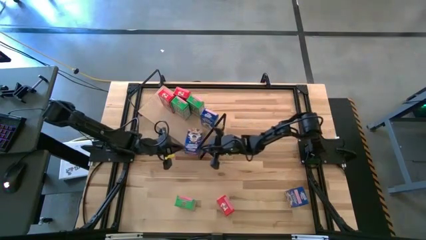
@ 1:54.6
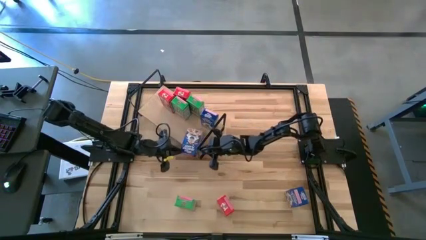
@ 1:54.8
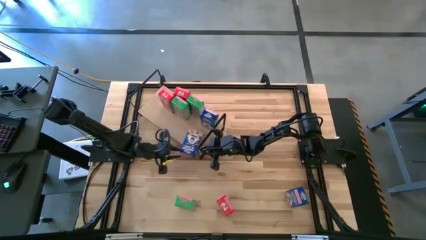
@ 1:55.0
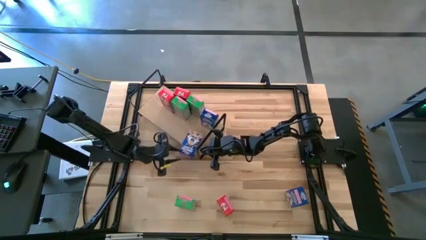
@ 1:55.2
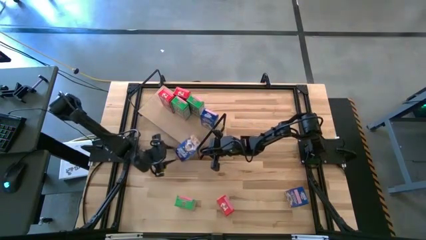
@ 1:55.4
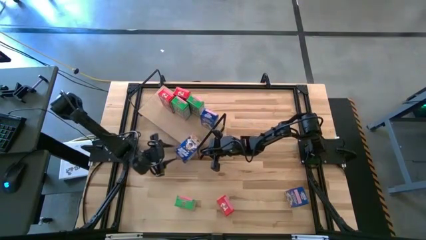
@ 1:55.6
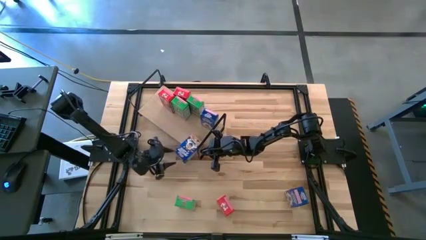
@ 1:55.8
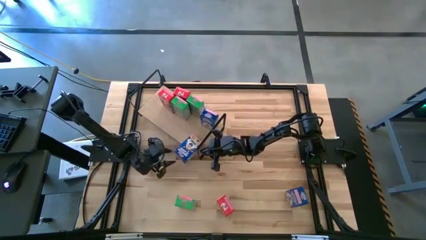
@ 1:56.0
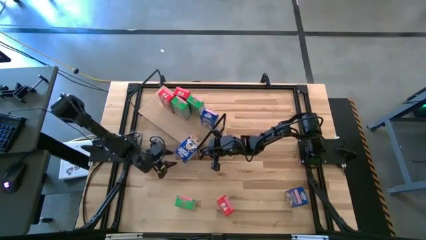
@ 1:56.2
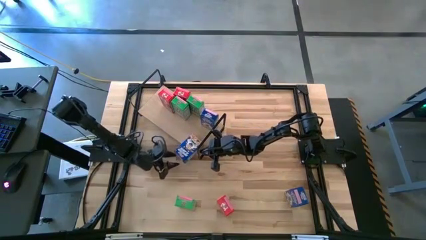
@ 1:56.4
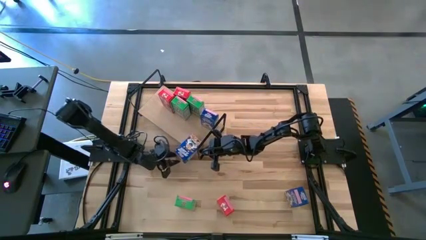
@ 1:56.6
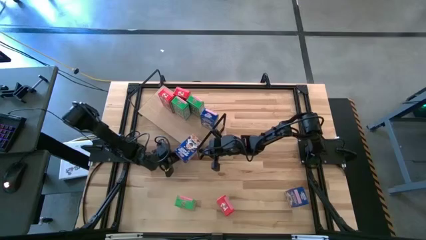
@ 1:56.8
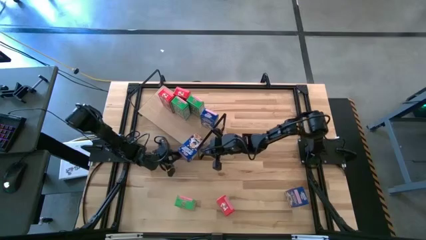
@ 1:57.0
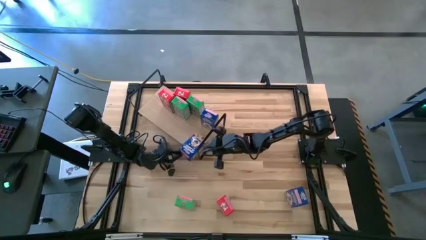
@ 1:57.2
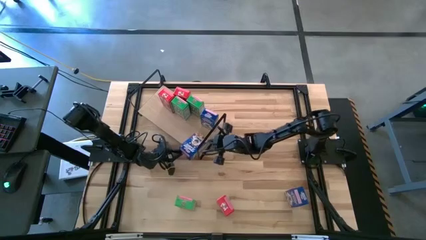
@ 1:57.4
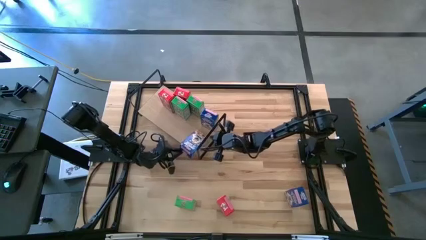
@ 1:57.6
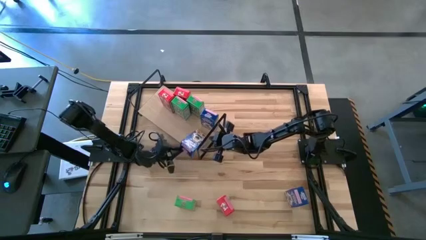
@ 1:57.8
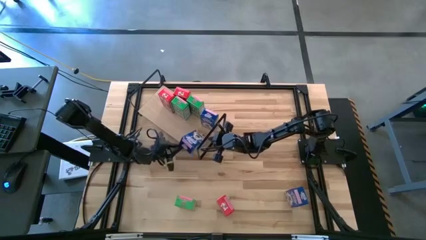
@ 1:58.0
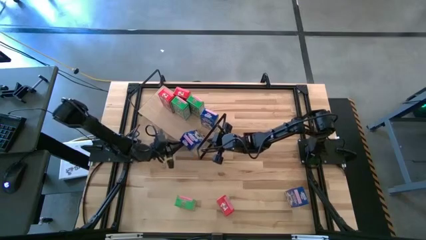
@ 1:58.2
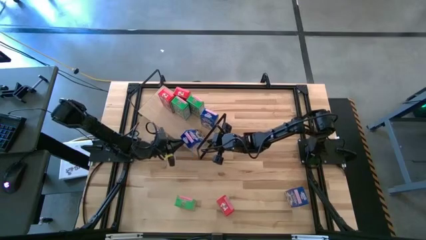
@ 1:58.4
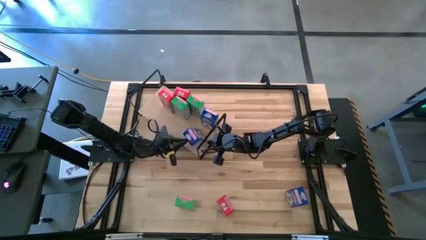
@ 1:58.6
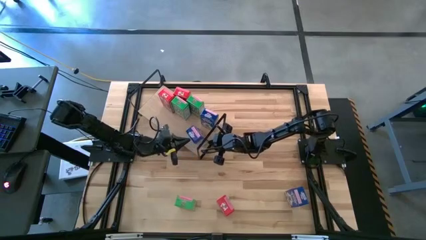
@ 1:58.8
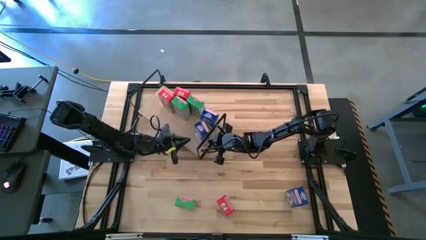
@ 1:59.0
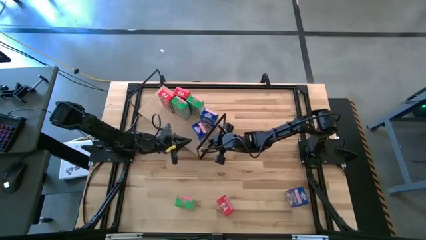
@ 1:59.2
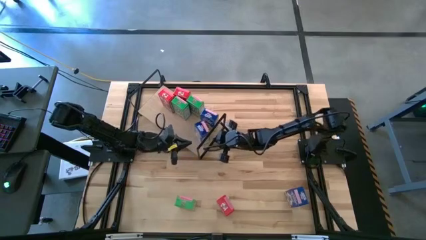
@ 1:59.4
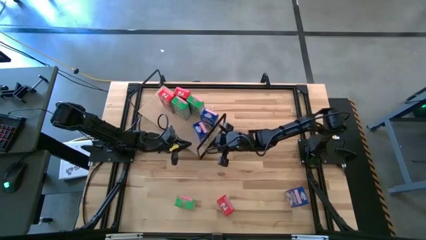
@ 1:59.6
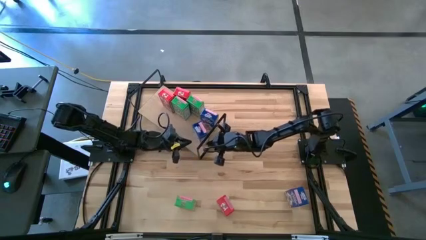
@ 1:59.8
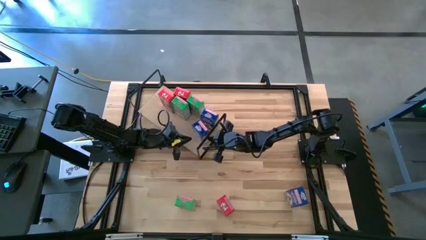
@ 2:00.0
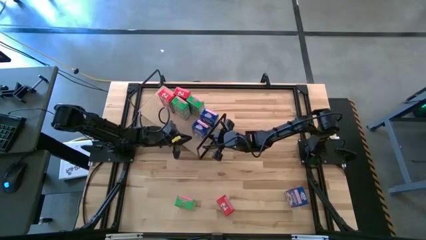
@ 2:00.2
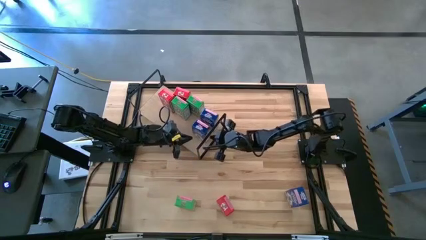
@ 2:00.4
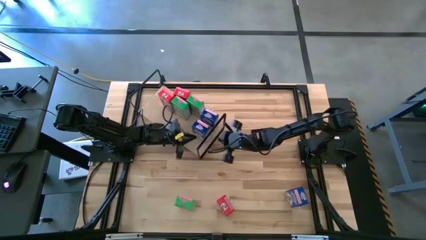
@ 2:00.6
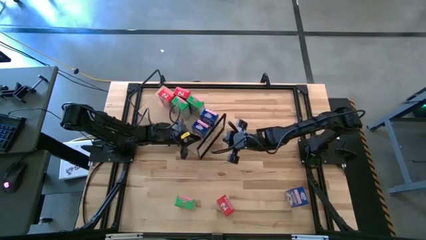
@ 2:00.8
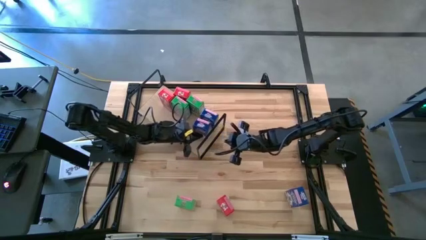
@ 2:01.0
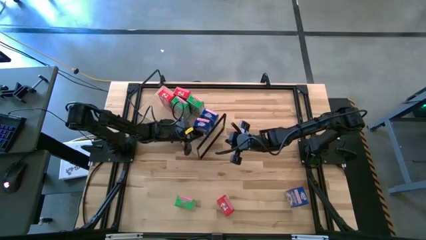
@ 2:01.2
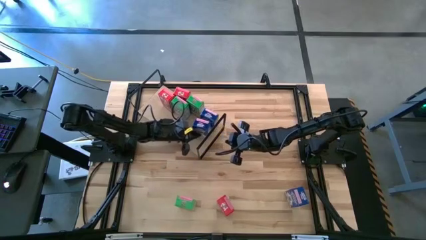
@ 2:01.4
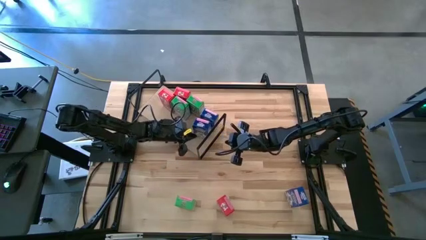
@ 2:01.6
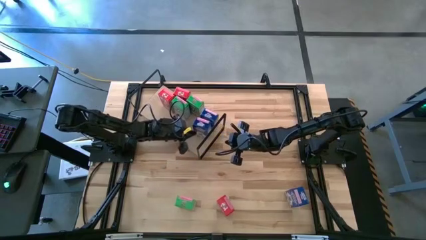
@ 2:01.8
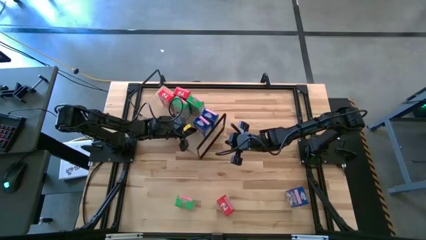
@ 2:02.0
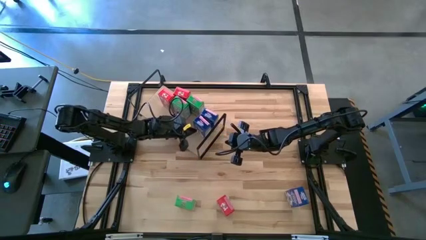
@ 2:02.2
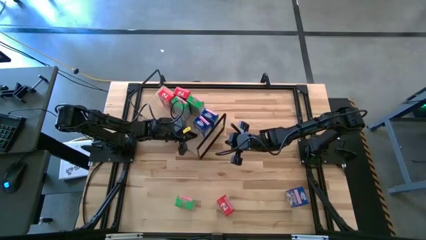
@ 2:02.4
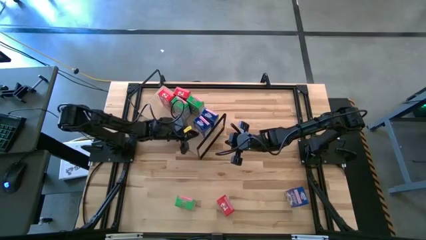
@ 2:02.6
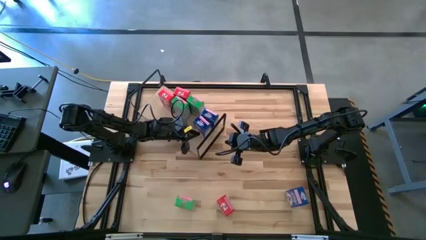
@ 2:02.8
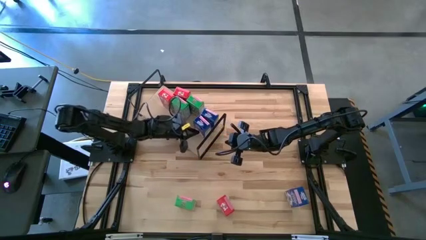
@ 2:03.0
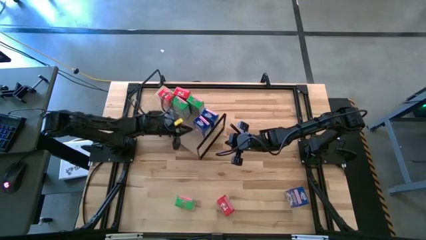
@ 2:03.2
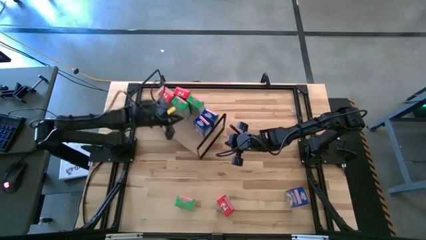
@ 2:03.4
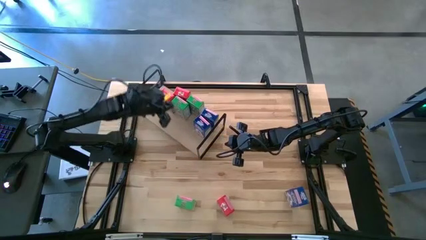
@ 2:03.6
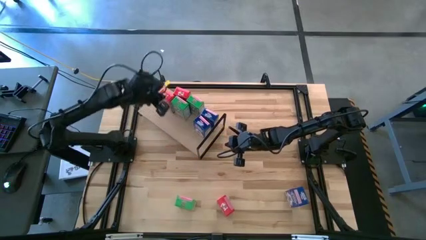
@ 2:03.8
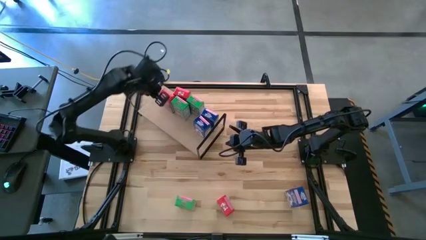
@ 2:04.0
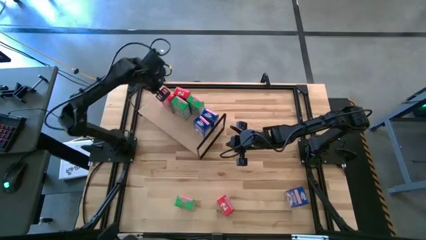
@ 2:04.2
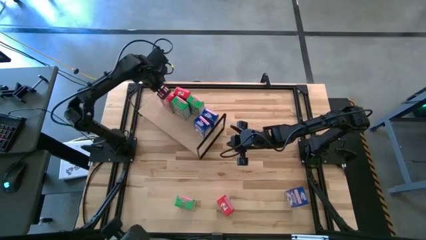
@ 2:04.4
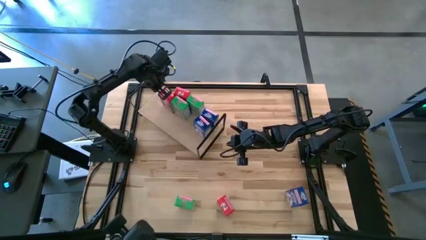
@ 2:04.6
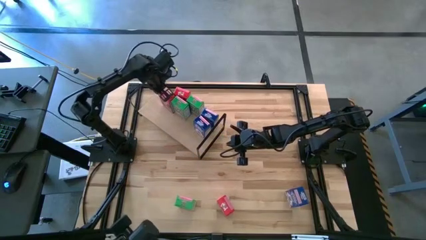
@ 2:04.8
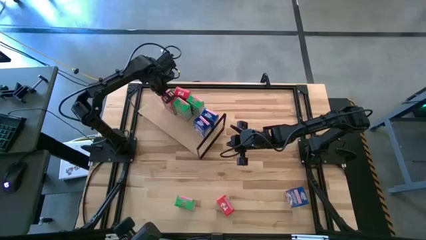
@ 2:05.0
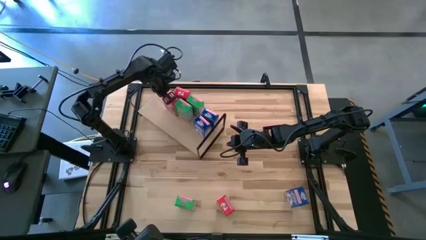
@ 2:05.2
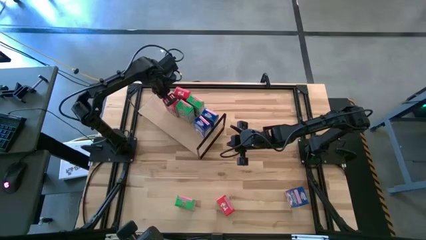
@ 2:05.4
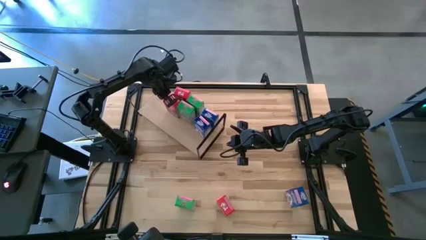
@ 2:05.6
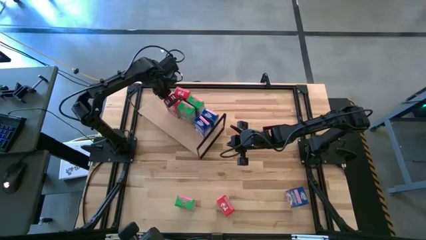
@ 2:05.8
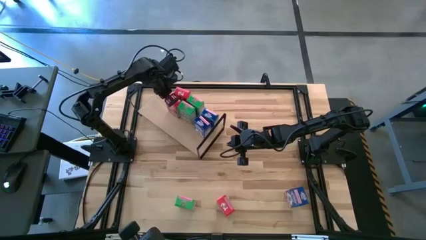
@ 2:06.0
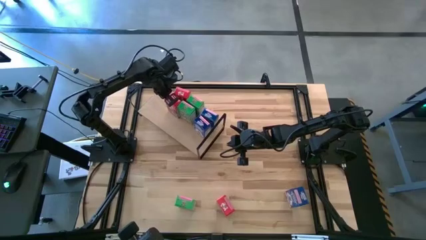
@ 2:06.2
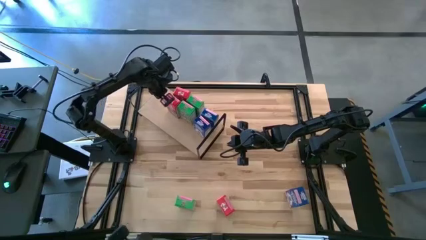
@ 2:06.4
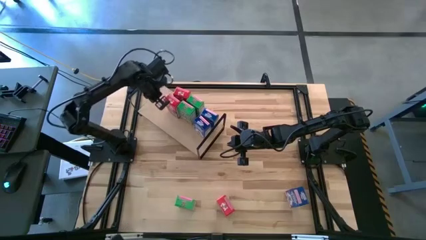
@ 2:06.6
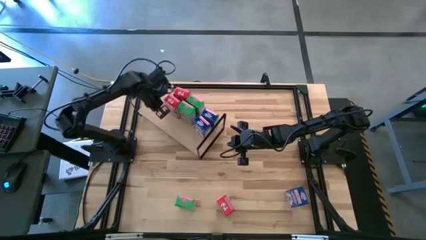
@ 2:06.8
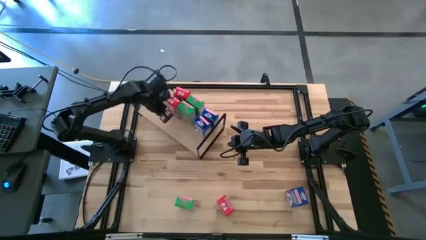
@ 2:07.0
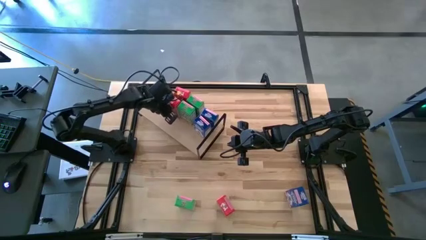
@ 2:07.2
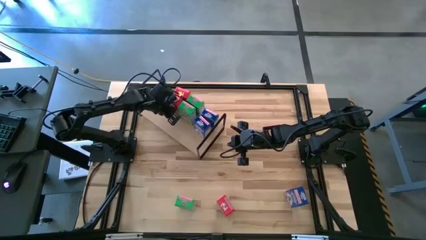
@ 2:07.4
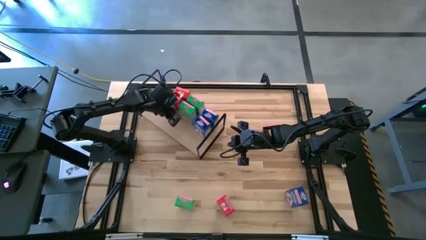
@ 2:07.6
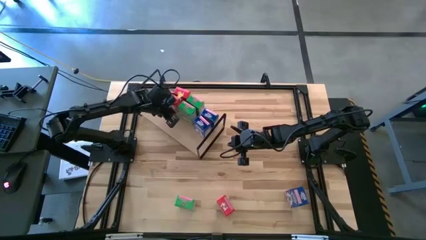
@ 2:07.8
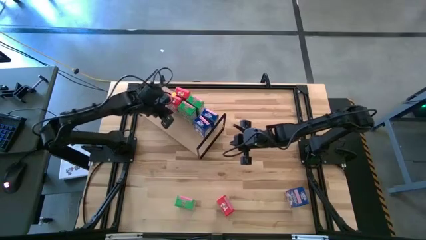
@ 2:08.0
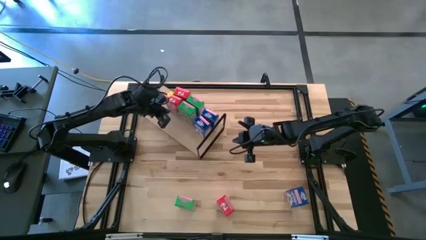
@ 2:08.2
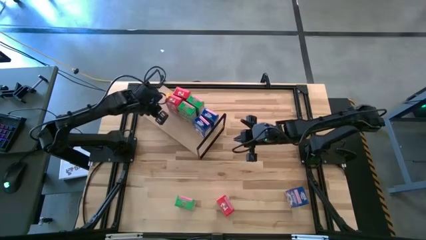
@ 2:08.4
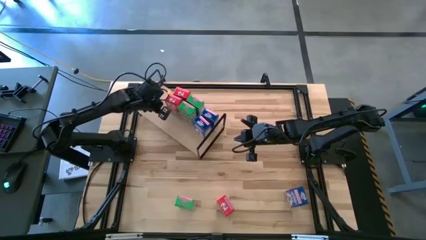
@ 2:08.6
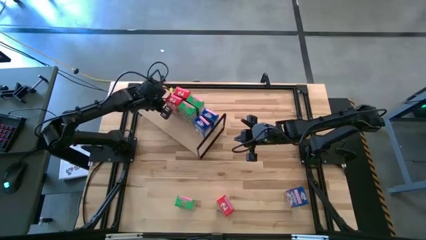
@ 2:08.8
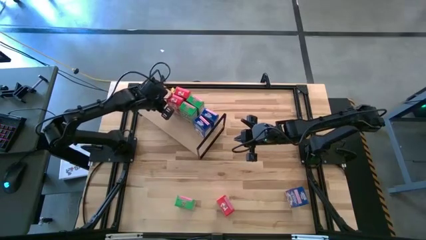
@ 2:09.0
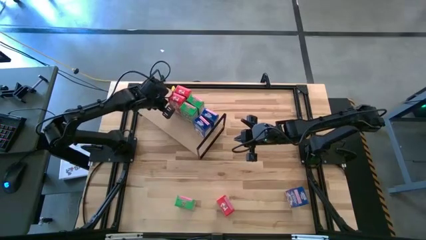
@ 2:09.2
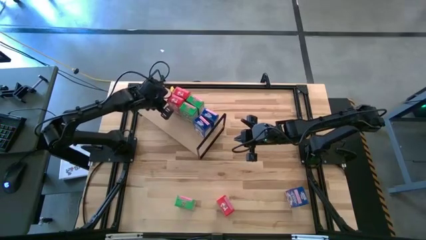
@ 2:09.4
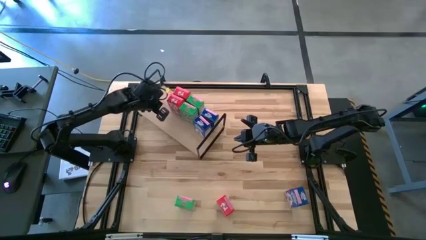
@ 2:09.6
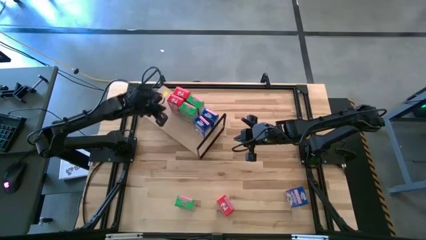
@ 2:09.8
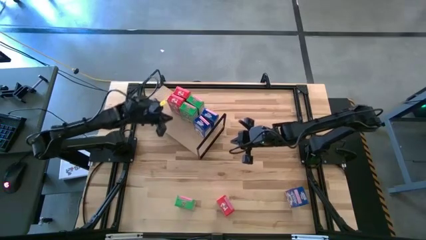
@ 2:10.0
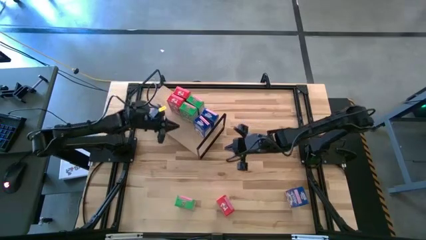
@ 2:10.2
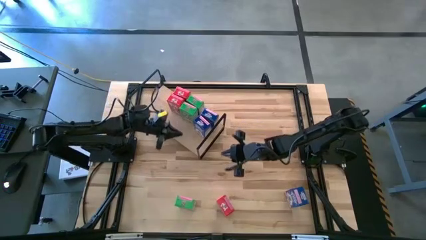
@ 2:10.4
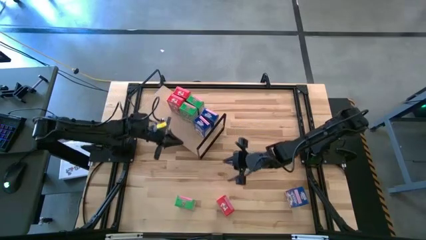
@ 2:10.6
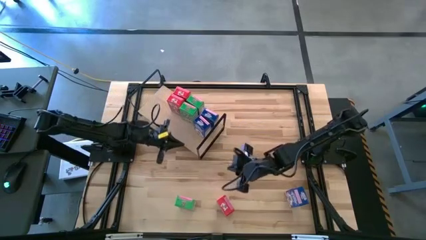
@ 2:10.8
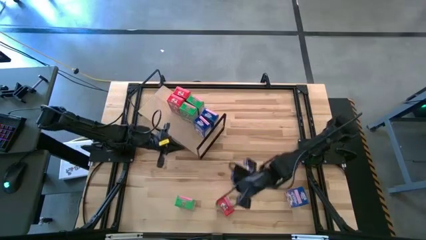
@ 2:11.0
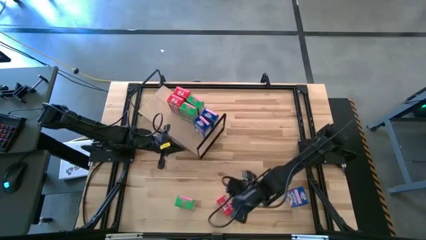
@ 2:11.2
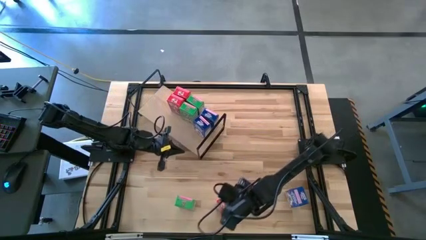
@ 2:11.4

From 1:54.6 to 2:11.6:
Task: Stack cereal on shelf
Adjust the cereals on the shelf

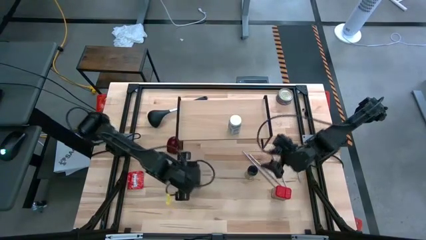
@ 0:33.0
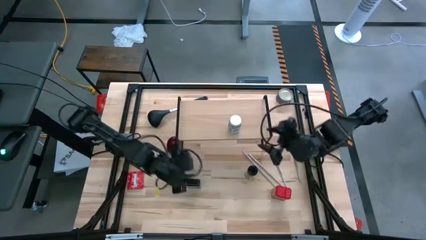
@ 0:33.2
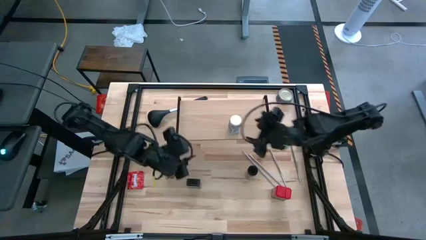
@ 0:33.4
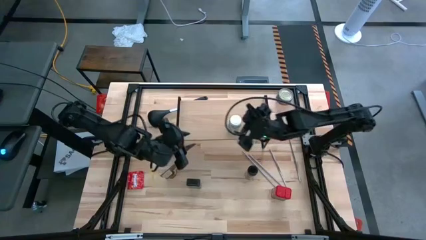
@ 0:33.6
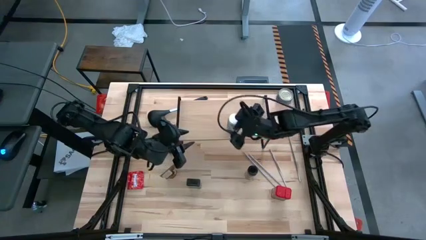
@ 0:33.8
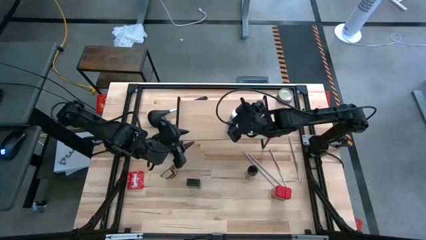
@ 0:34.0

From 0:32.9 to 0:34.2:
Task: Shelf spices
Remove the white seasoning bottle from the shelf
